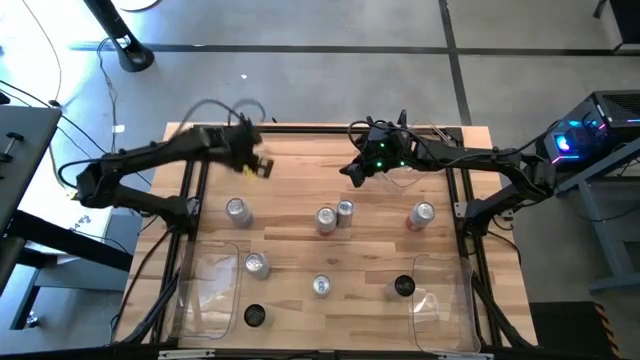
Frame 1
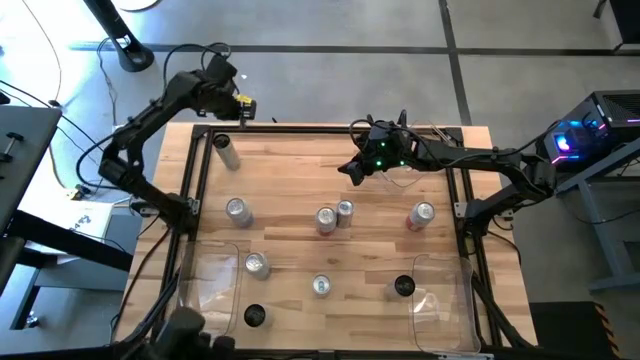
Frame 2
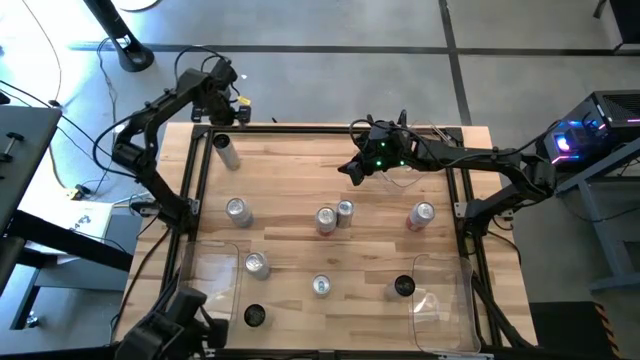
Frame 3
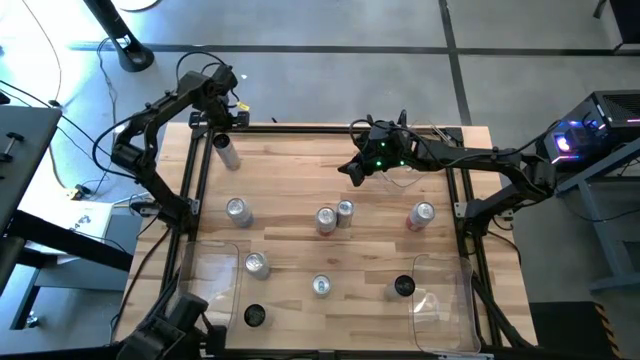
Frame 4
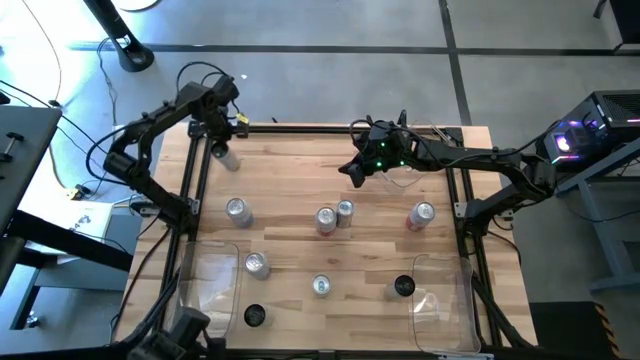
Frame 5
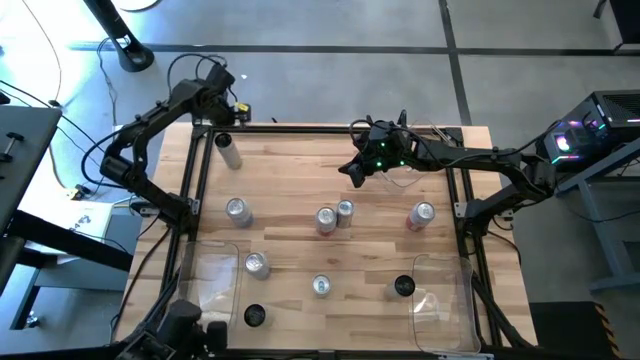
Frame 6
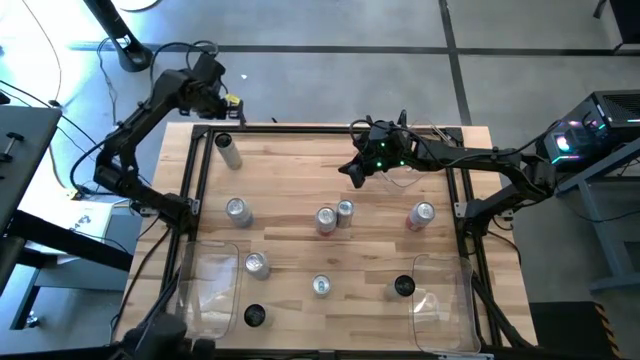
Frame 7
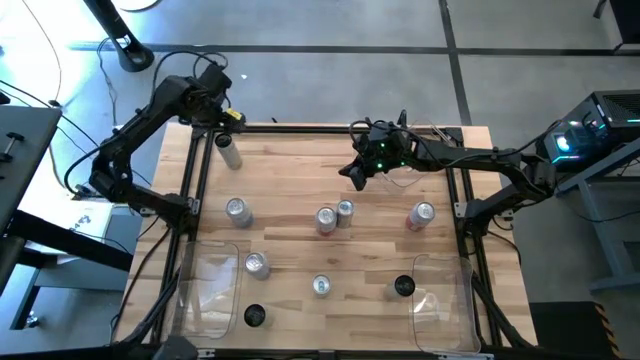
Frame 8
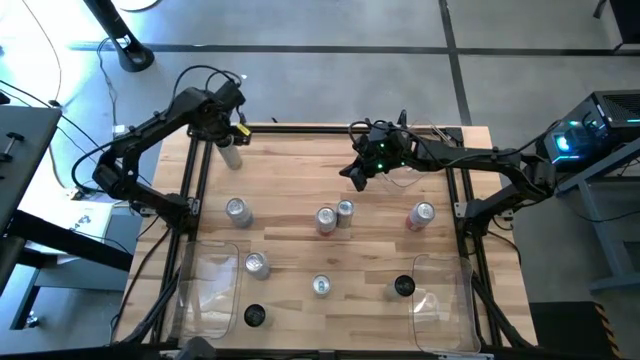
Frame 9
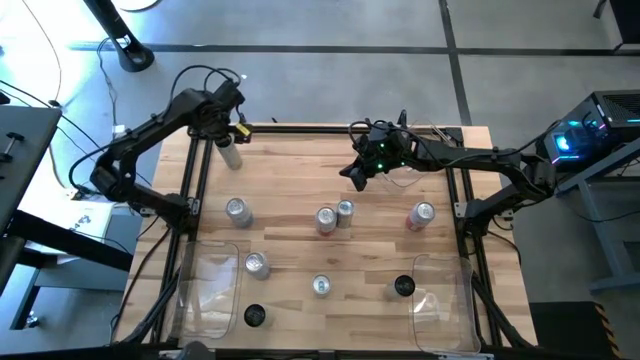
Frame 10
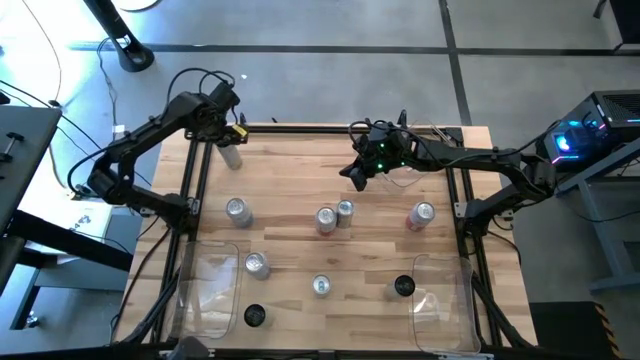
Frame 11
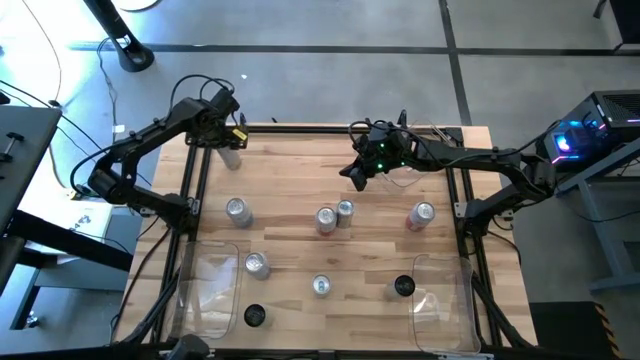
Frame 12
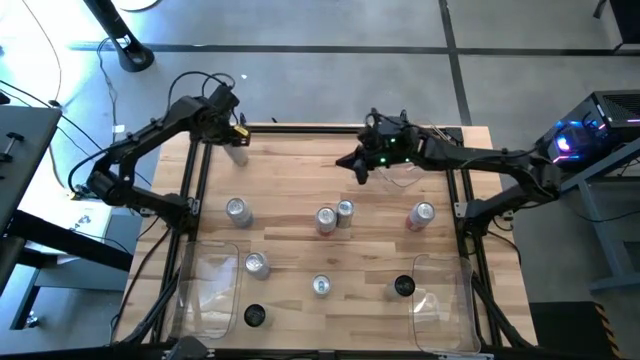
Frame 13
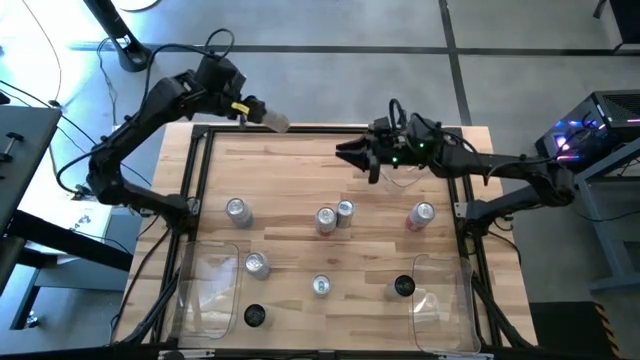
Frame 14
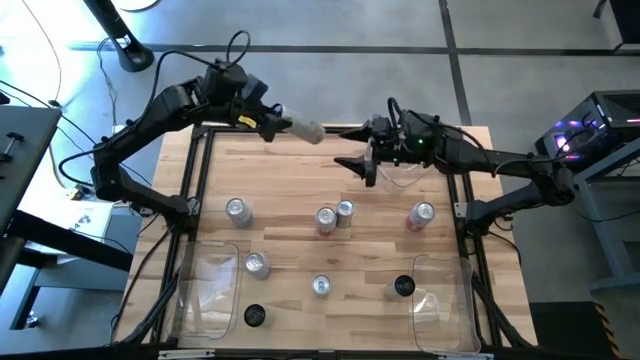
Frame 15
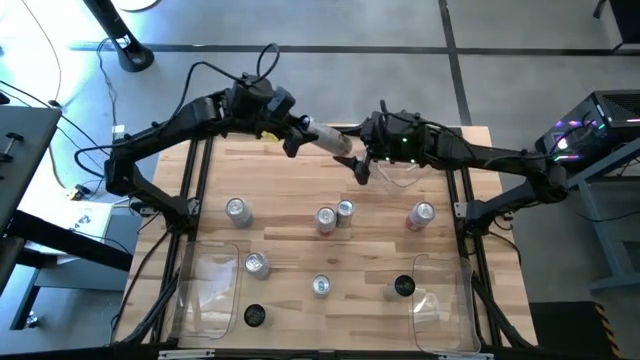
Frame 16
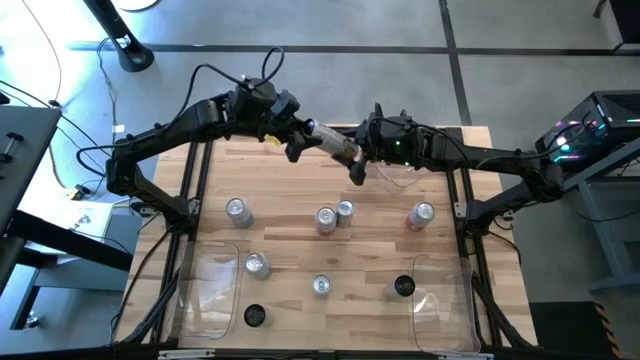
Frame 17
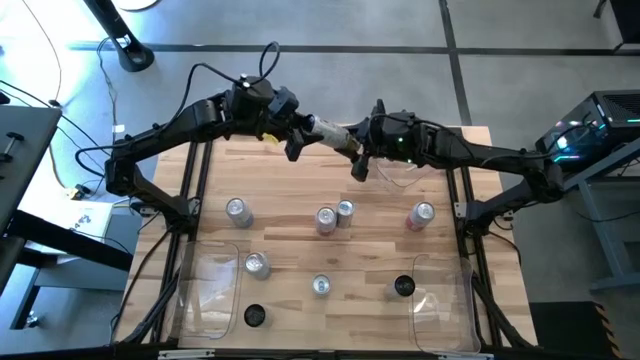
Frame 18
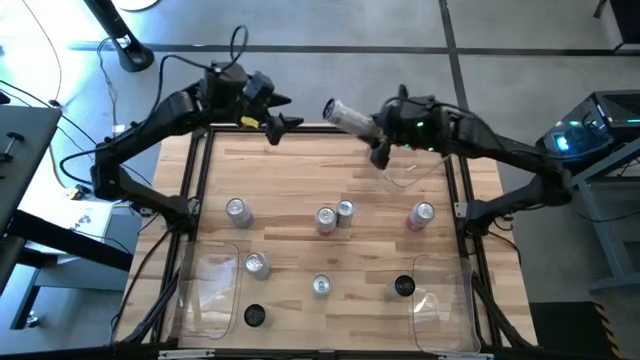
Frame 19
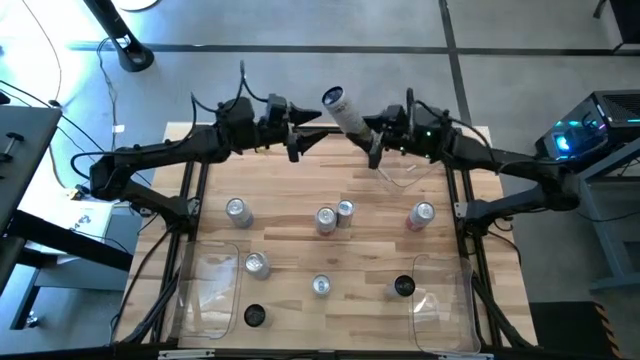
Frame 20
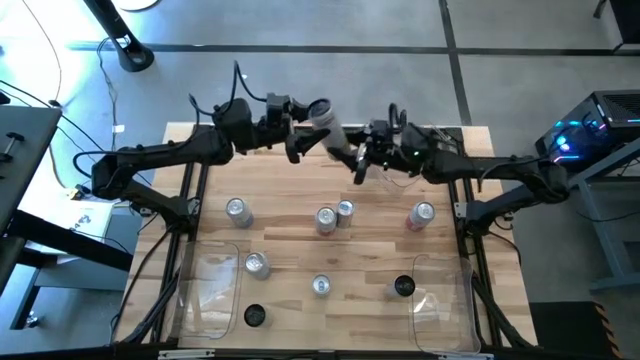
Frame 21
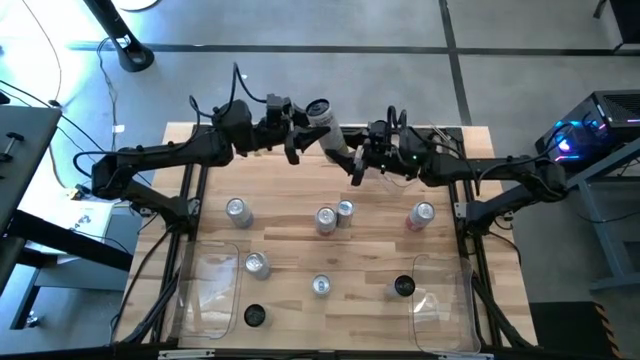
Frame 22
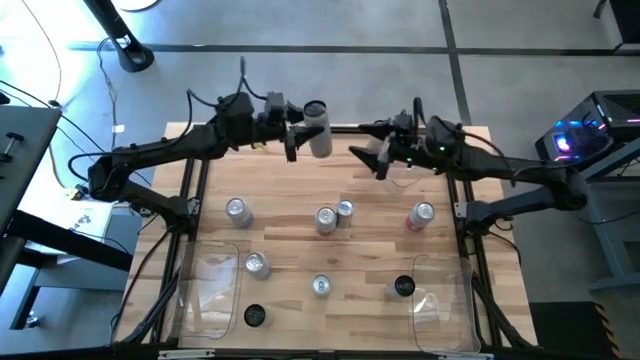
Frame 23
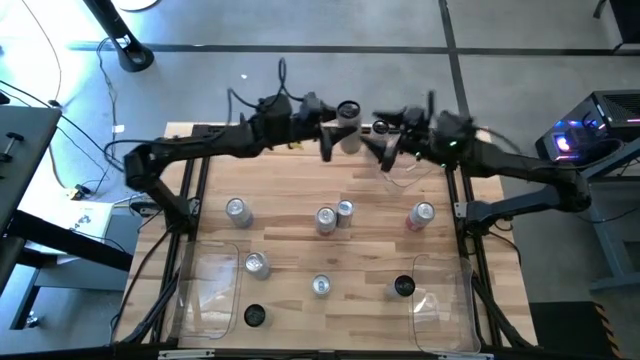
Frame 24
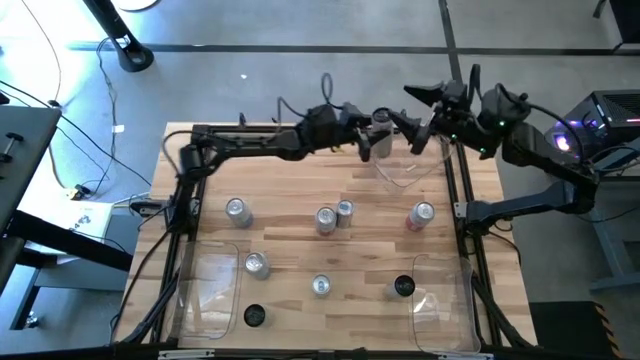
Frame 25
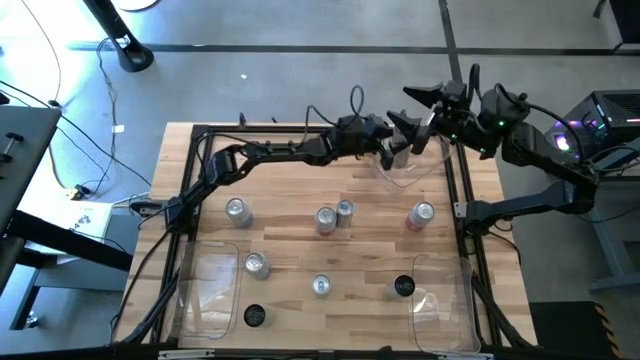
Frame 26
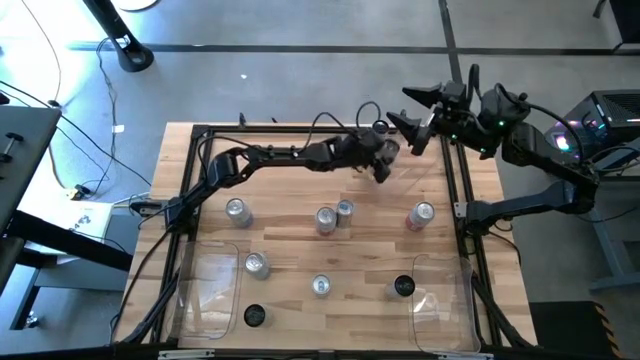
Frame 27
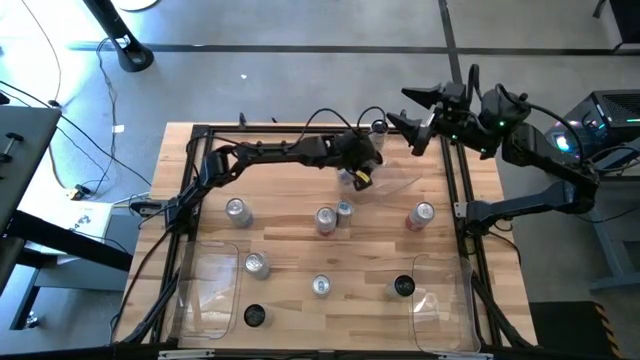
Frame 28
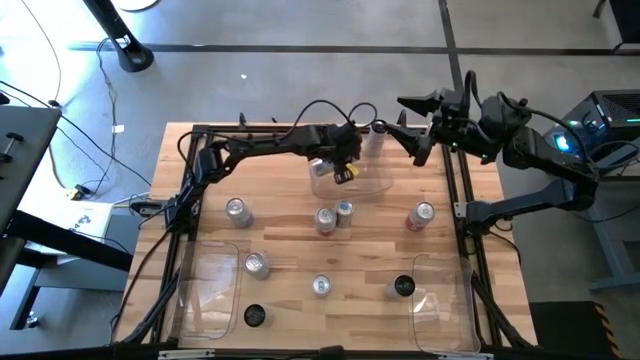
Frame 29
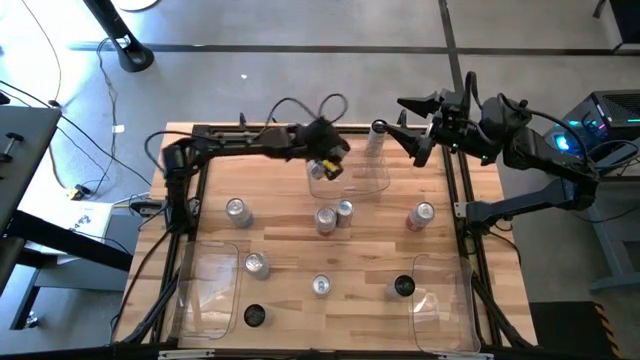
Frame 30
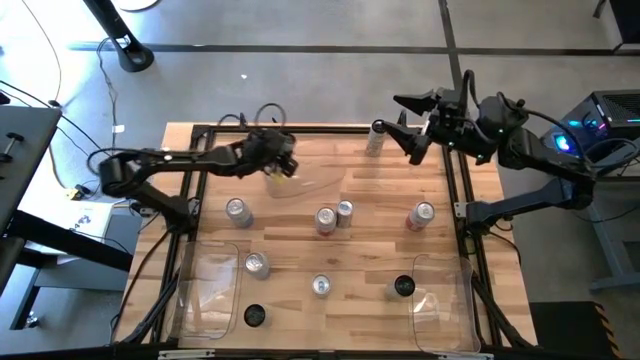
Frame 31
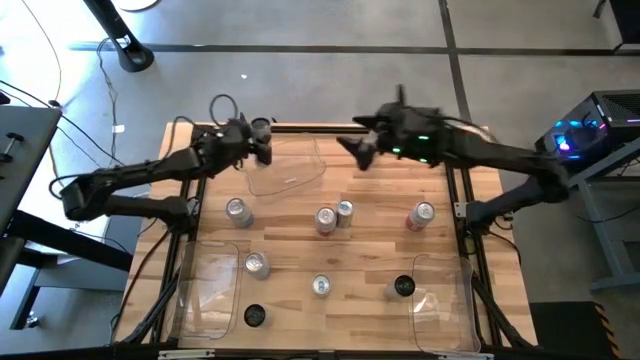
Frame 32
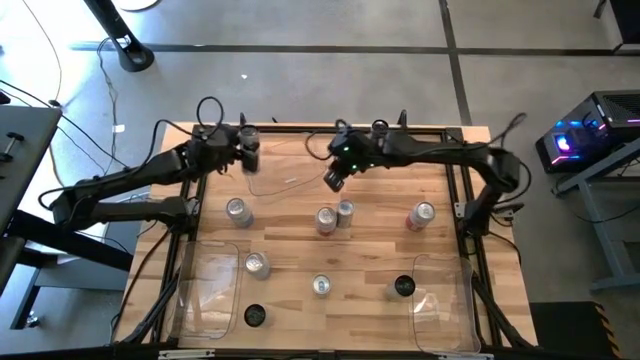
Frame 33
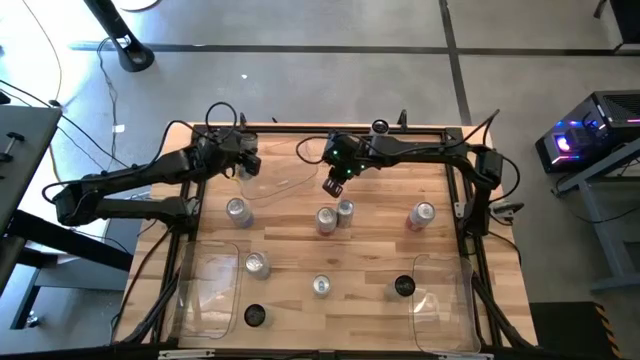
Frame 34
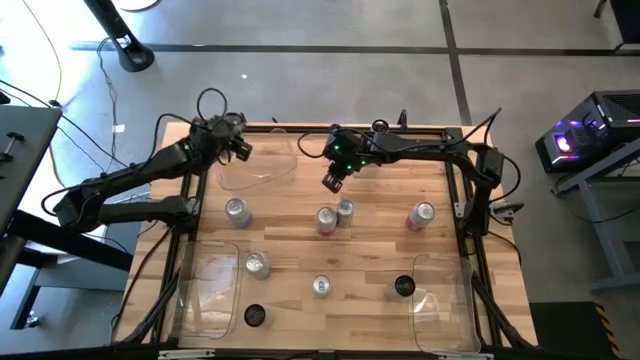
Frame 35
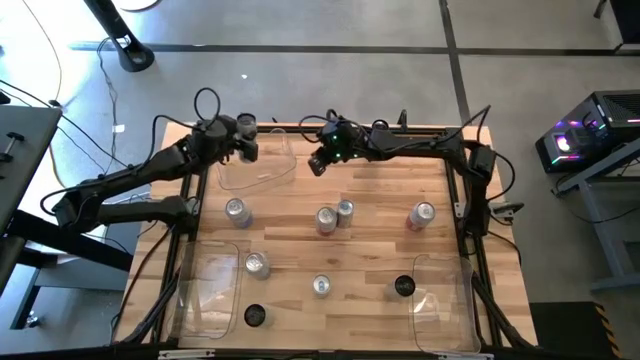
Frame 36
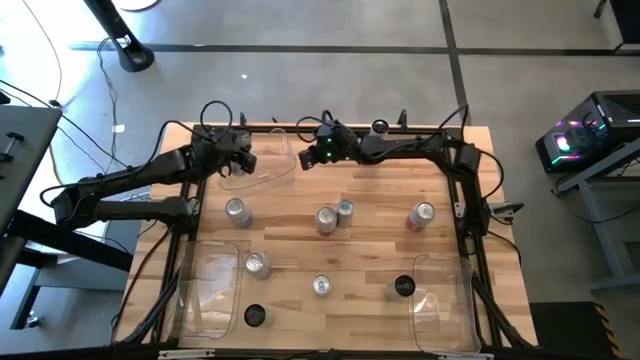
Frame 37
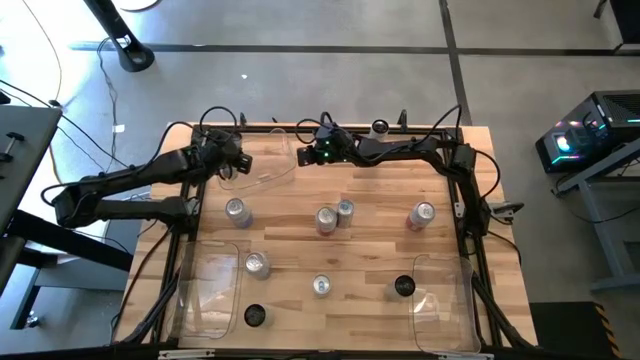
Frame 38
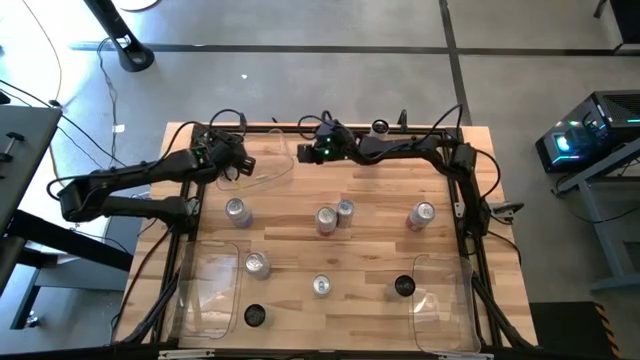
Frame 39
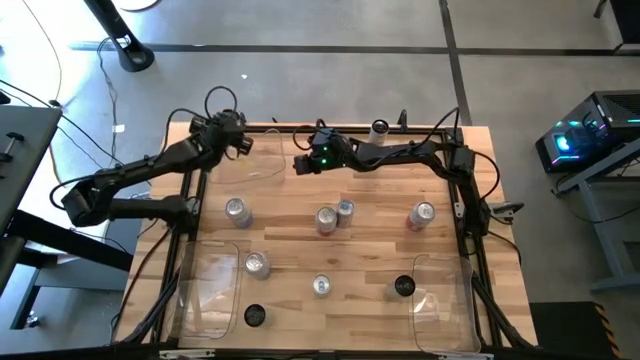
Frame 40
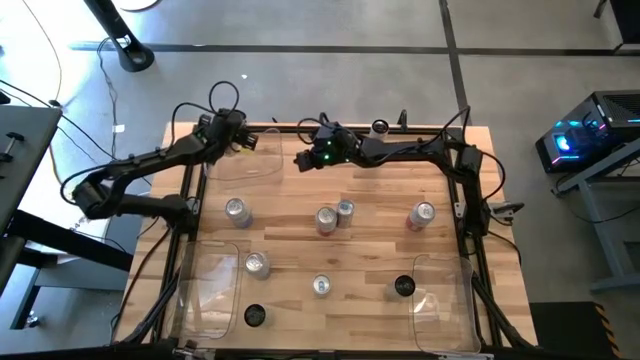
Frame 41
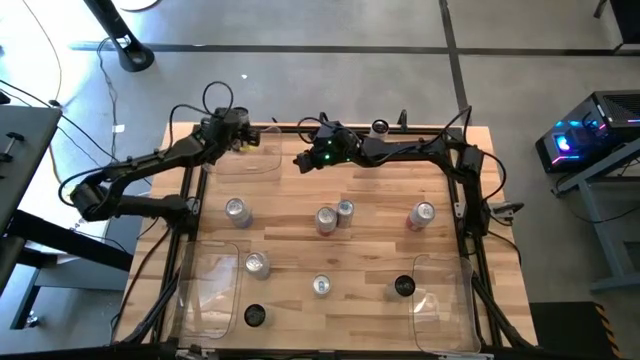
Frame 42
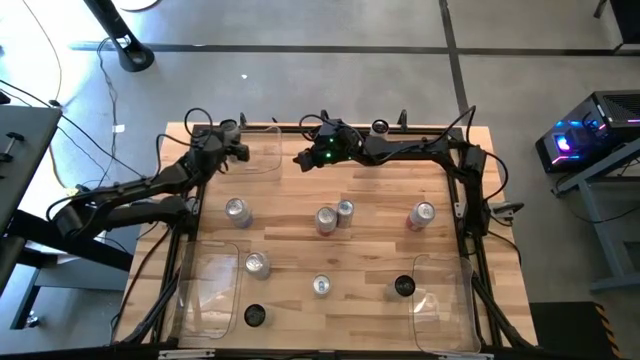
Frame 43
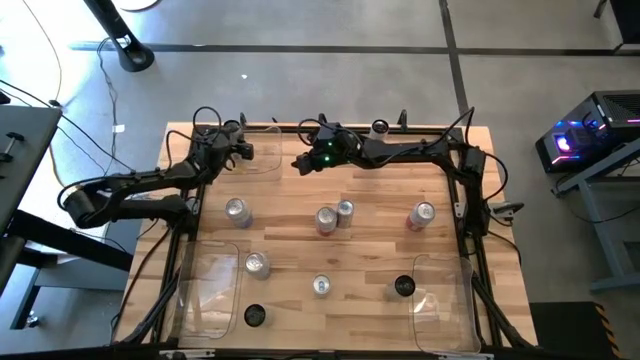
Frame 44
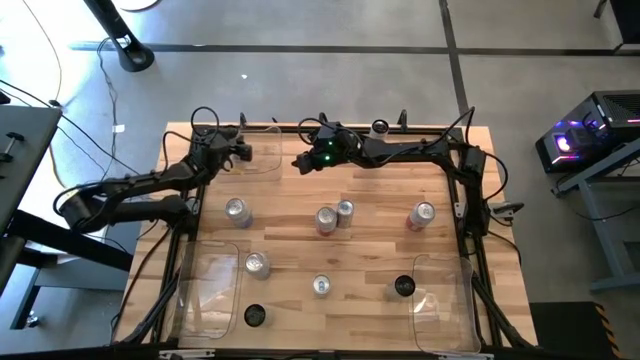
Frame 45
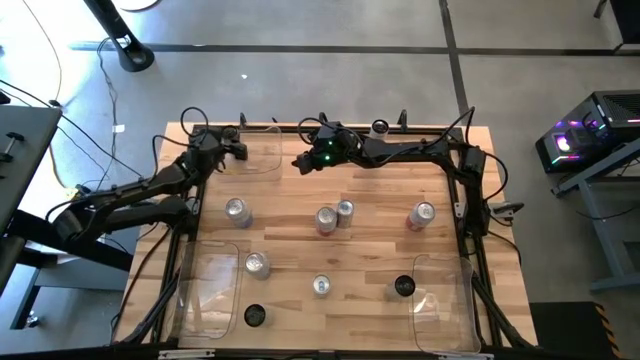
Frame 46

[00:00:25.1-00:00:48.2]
Task: Sort soda cans
Put the top left white-yellow soda can into the top transparent bin
